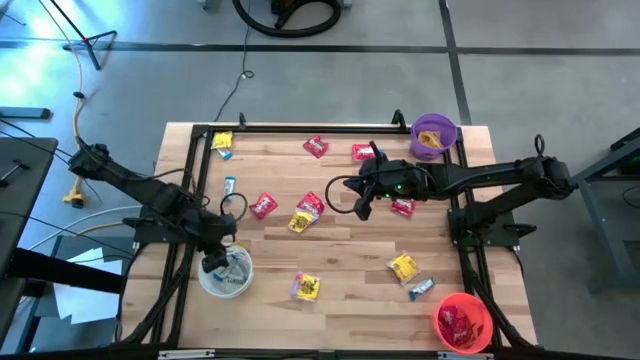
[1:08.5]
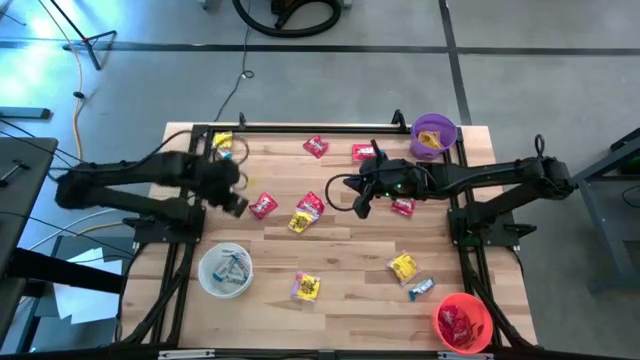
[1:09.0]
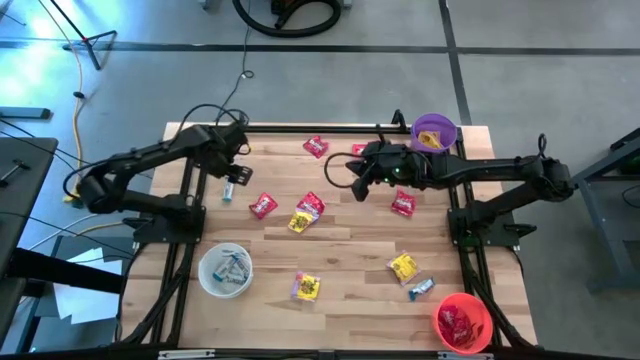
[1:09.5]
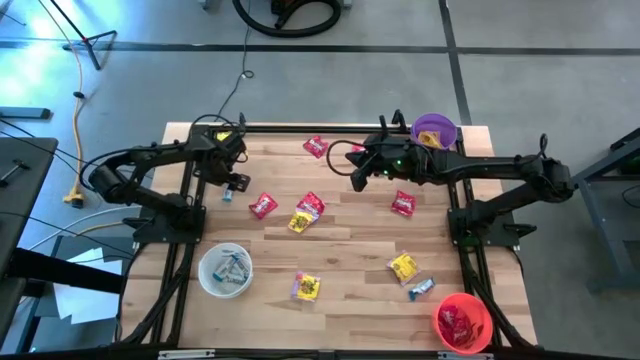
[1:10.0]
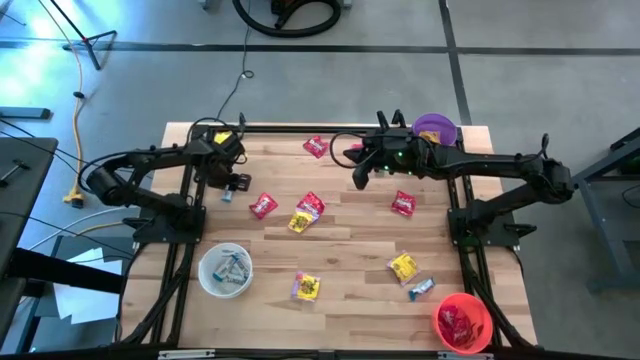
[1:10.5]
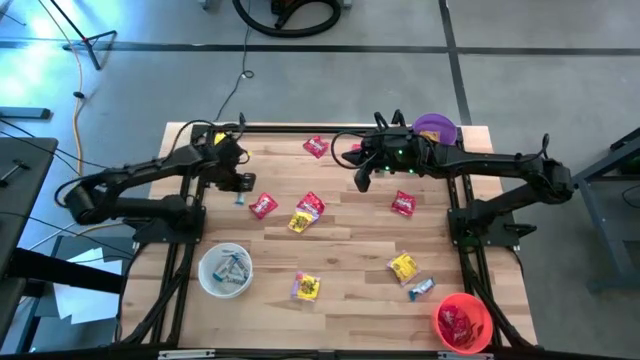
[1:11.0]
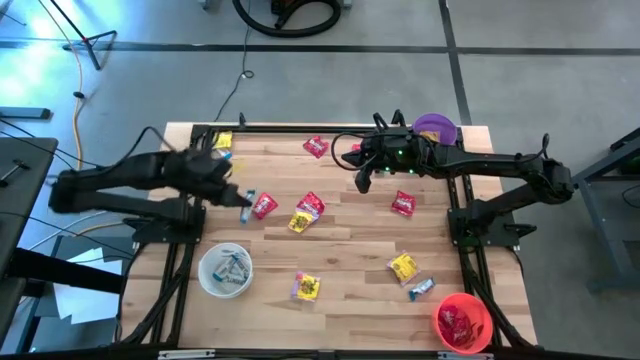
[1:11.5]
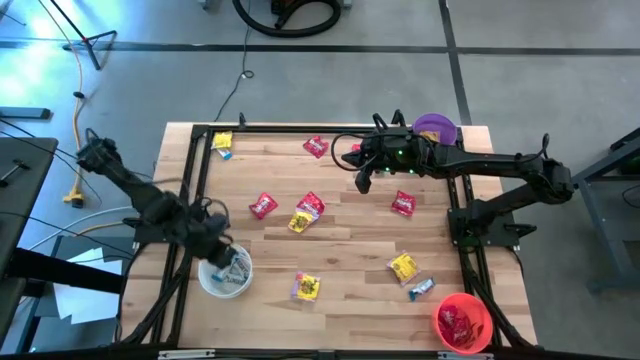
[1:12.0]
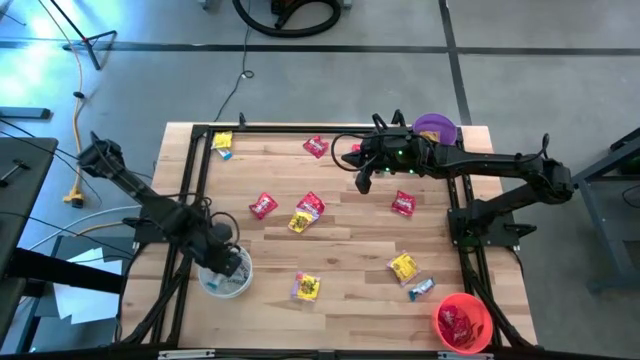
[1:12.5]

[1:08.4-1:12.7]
Task: Sort candy
Put the white chocolate bar into the white bin

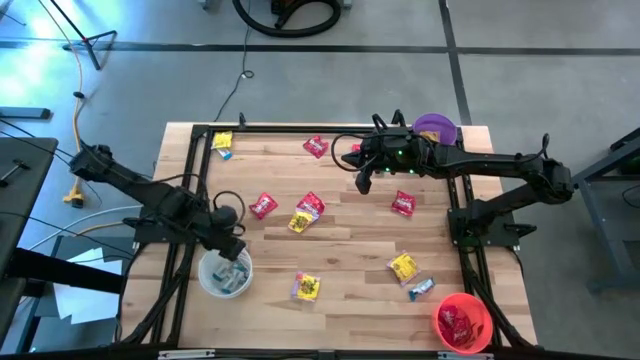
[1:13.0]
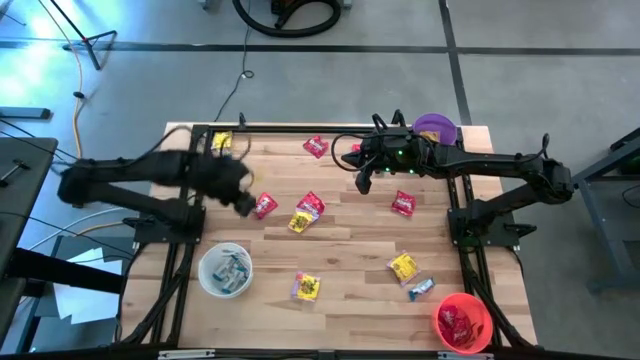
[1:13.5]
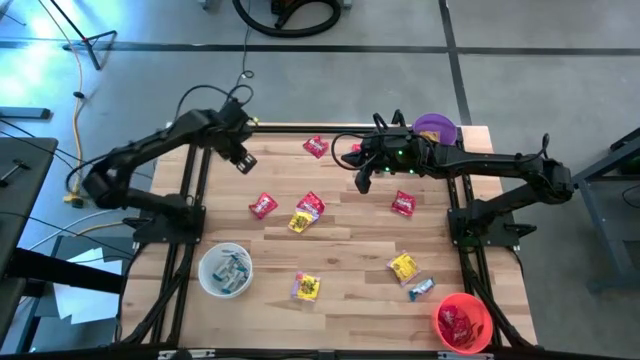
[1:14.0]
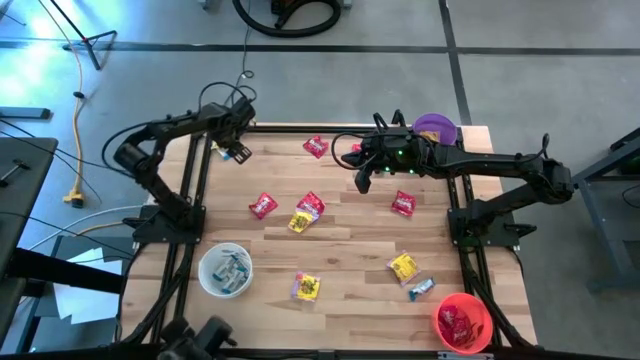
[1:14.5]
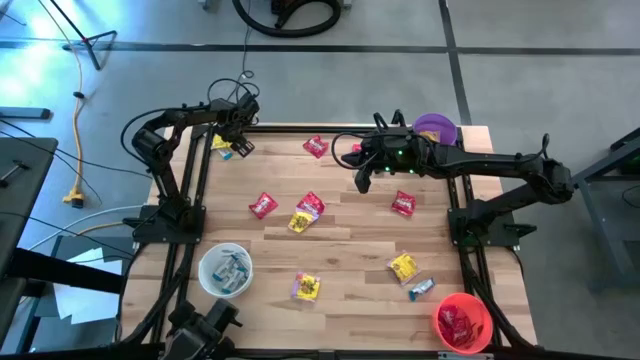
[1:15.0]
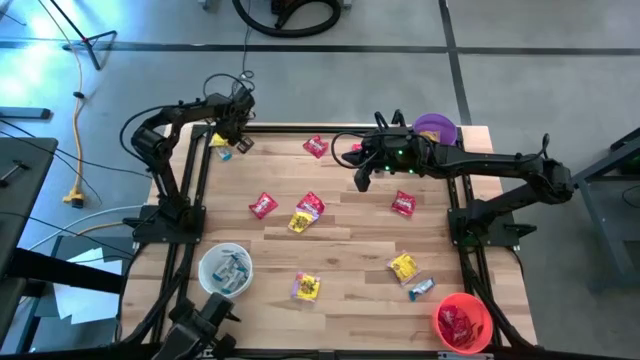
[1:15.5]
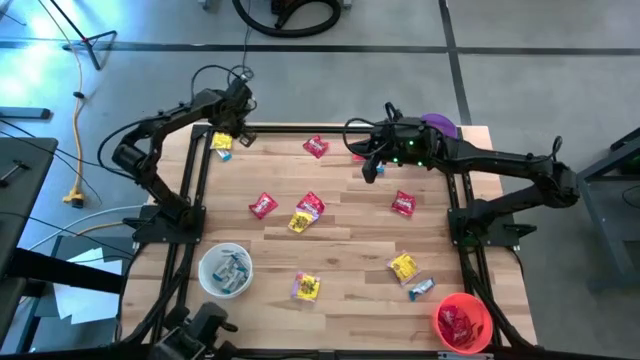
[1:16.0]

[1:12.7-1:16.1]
Put the yellow candy into the purple bin

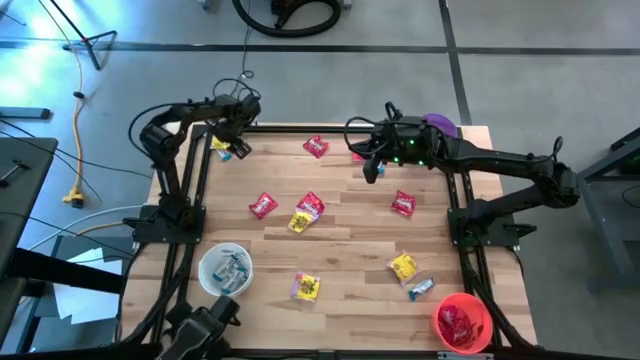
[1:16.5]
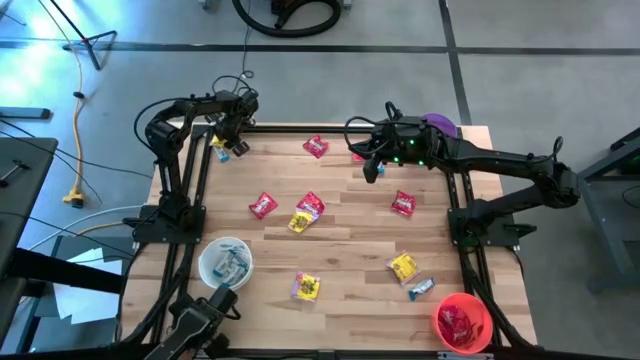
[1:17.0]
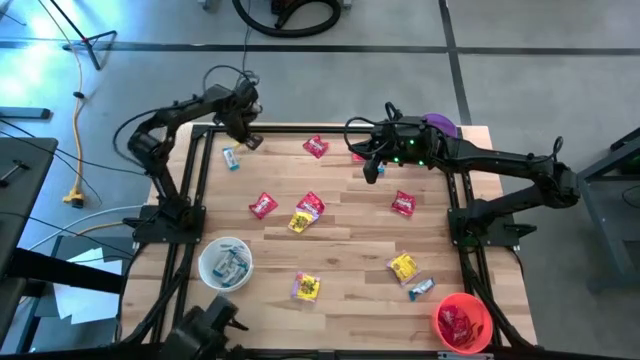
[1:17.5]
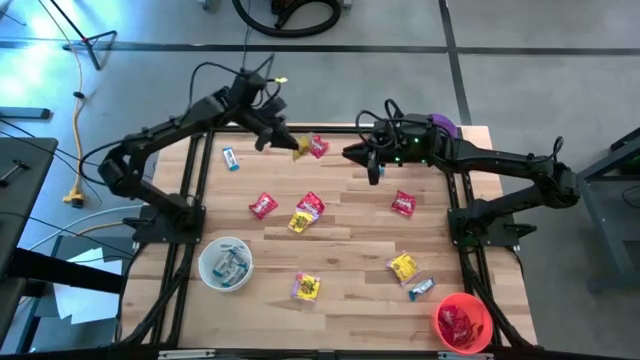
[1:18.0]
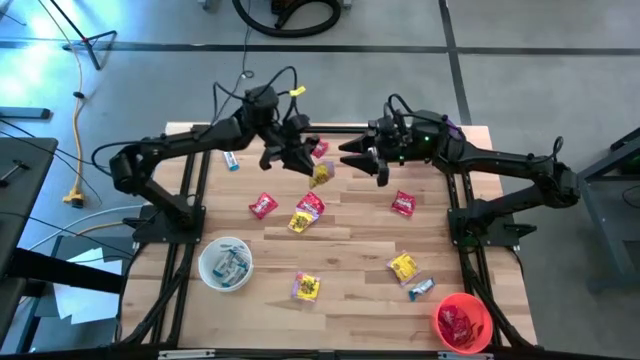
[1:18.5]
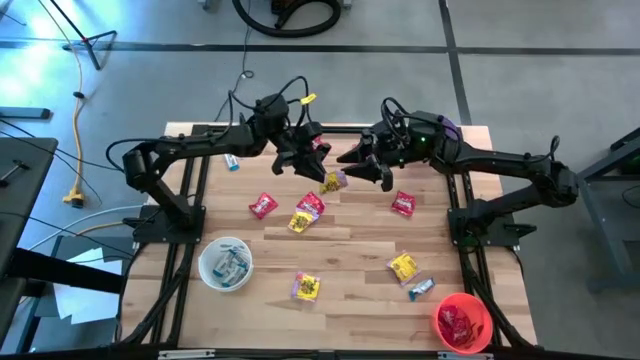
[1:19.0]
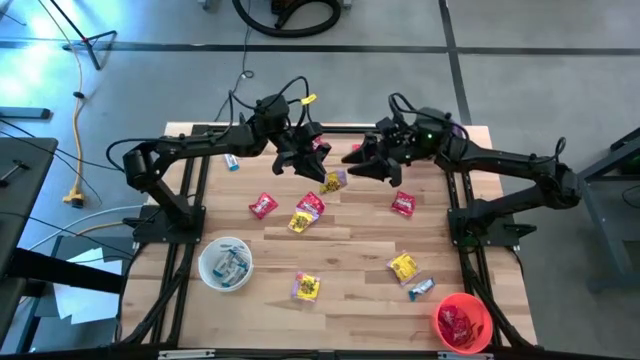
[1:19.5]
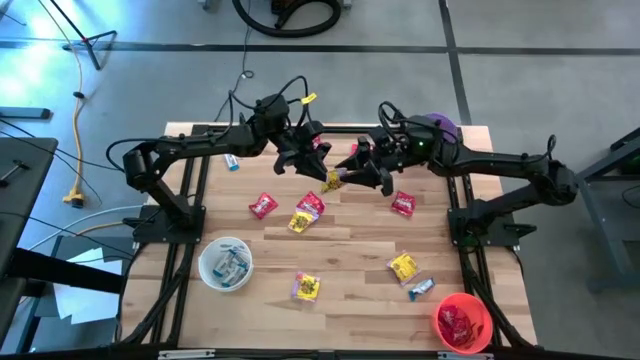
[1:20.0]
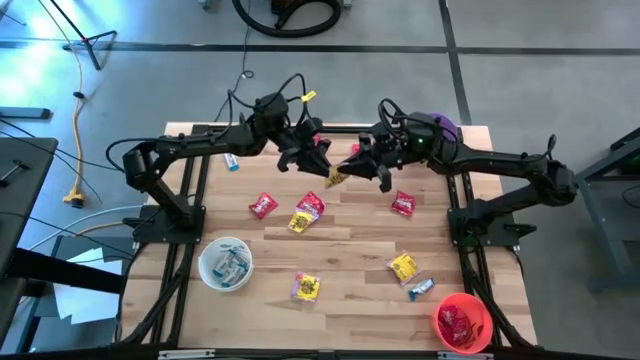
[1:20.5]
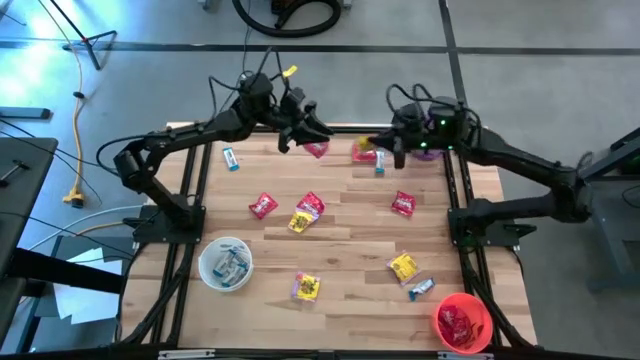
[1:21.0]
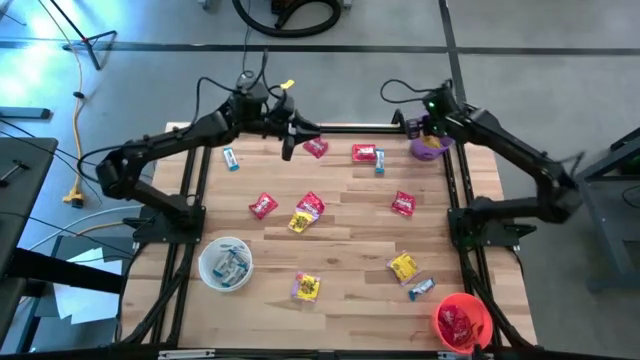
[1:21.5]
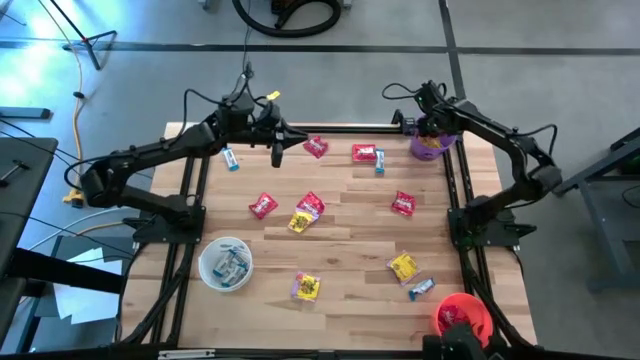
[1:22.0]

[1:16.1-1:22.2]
Put the yellow candy into the purple bin

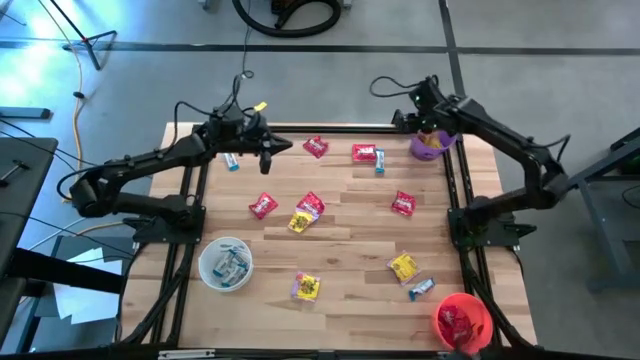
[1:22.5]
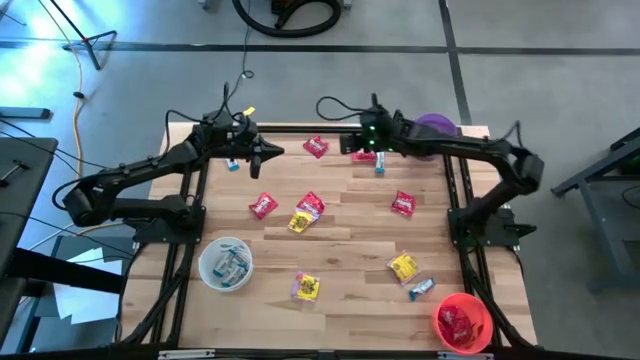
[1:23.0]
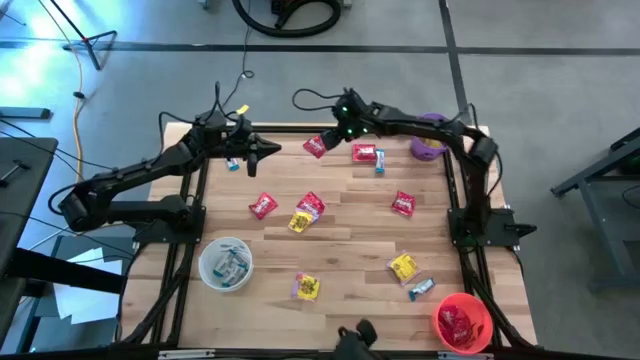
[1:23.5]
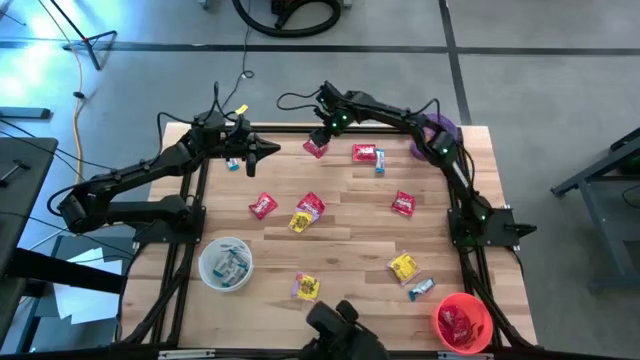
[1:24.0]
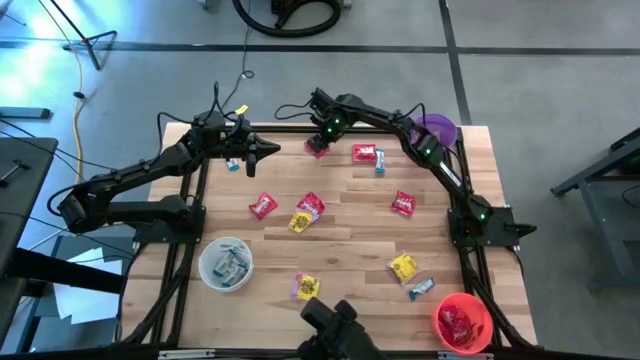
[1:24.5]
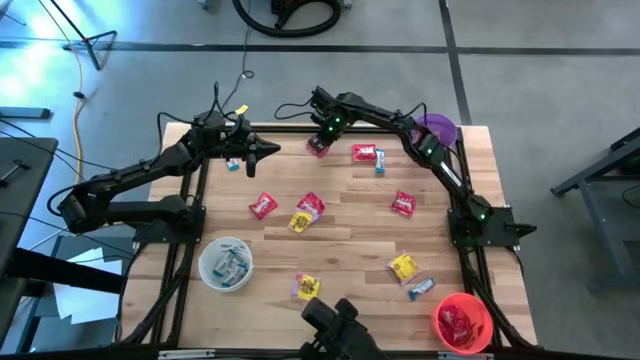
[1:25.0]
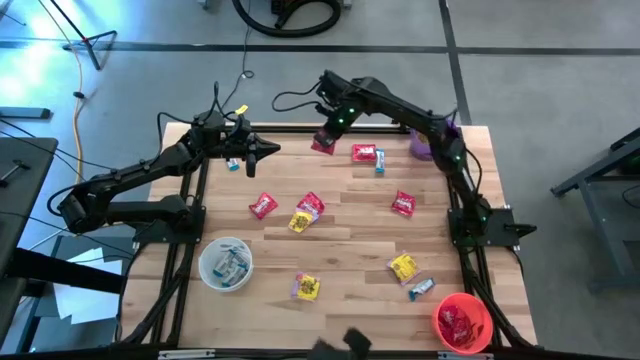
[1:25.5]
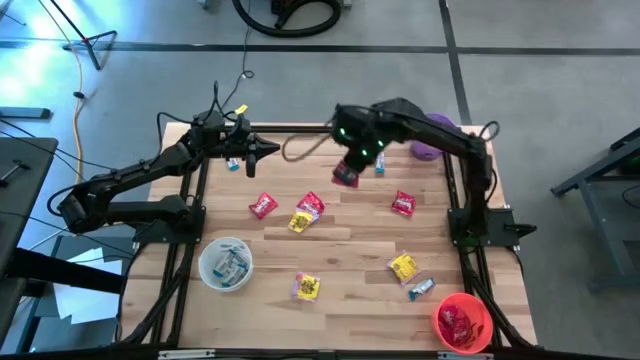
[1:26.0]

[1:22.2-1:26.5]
Put the red candy into the orange bin

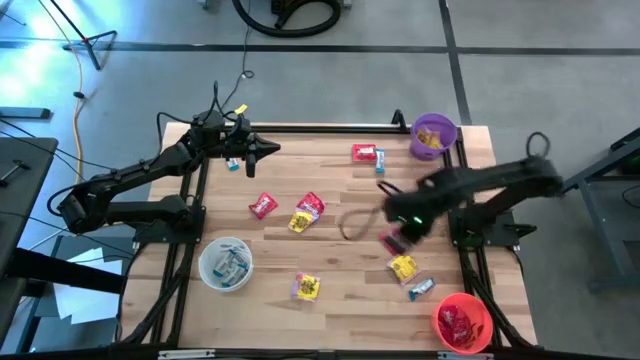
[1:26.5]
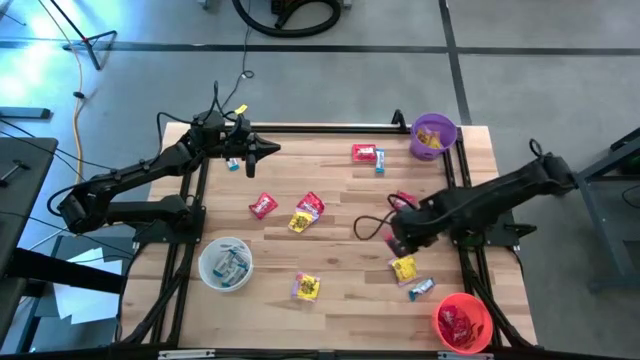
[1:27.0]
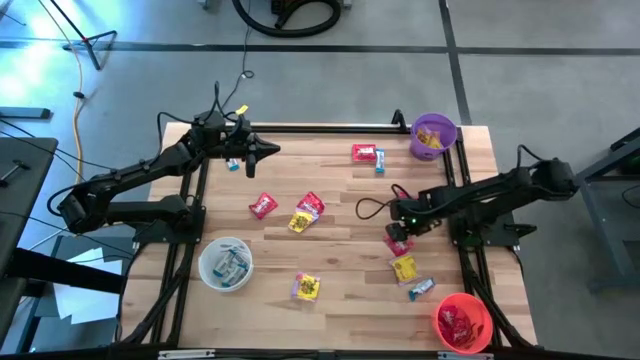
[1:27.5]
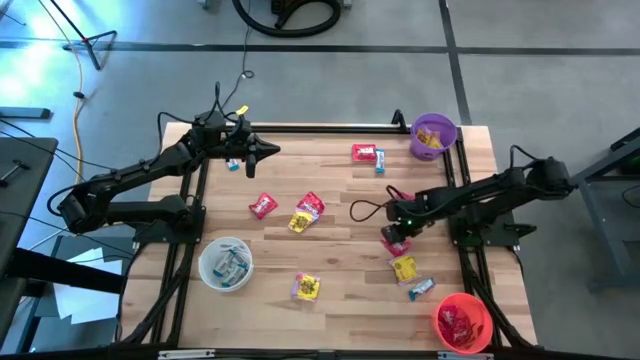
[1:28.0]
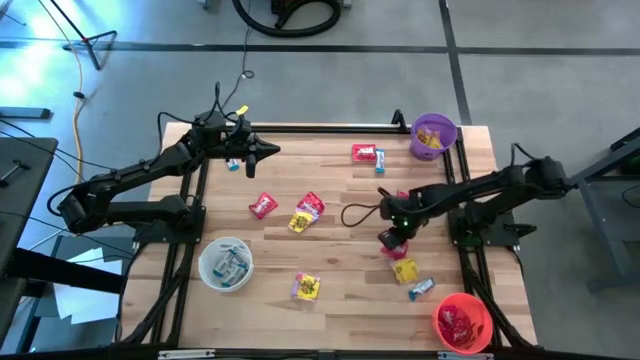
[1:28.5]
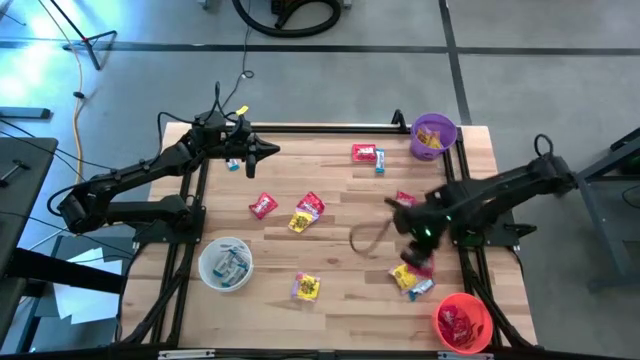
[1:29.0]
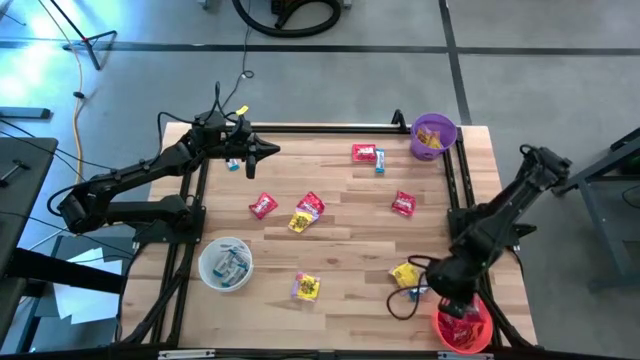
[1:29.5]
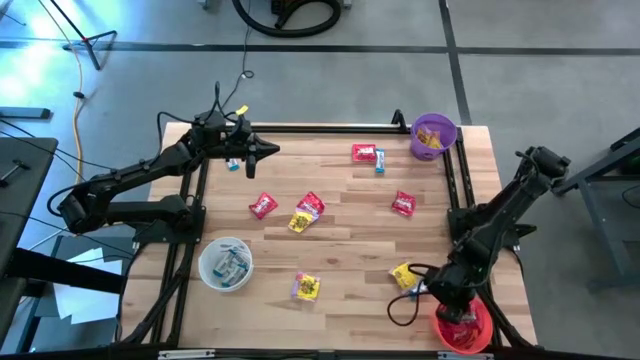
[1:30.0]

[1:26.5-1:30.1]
Put the red candy into the orange bin
